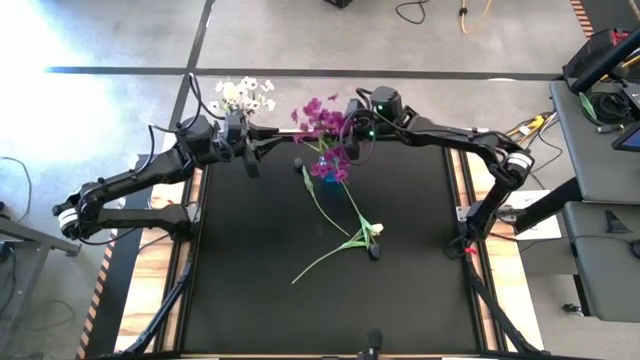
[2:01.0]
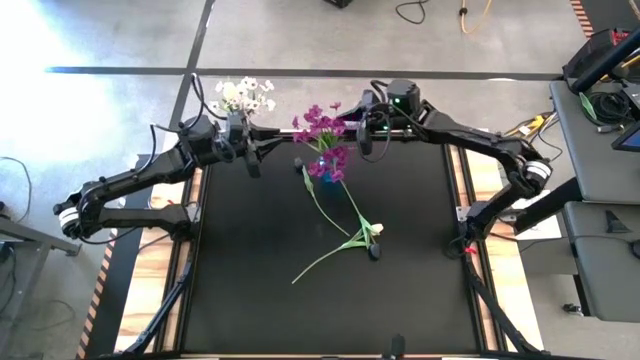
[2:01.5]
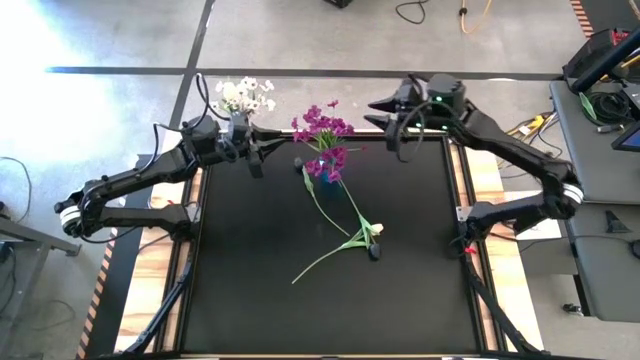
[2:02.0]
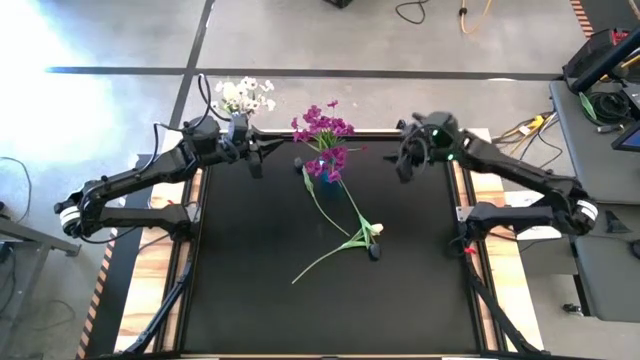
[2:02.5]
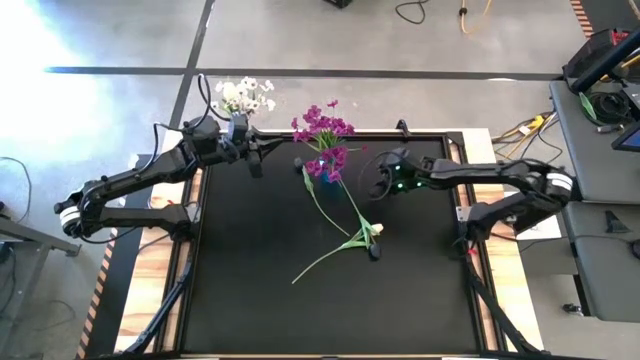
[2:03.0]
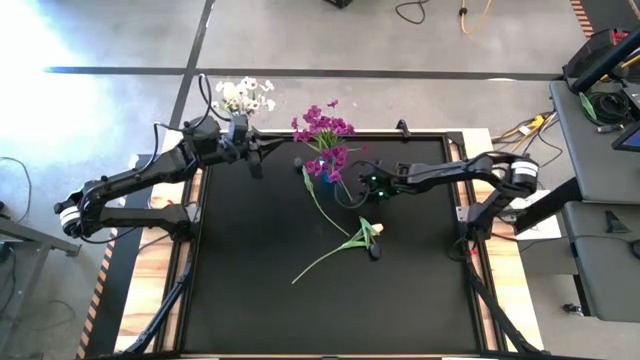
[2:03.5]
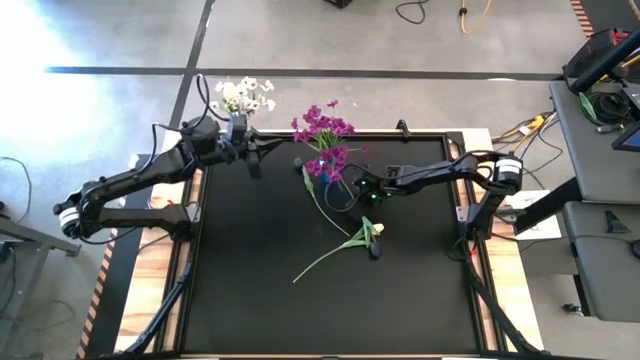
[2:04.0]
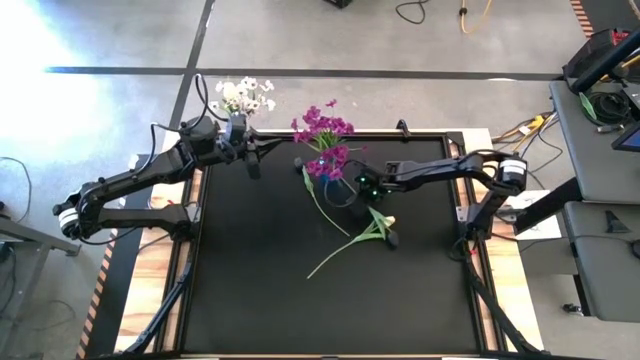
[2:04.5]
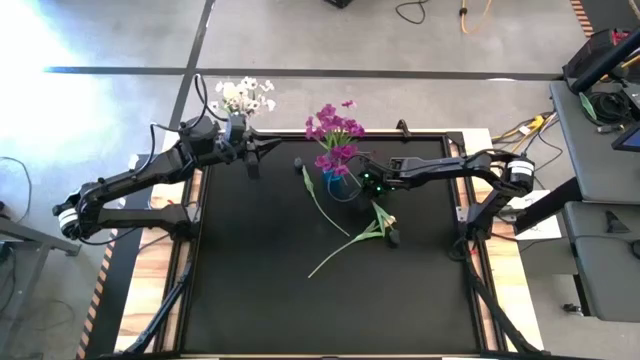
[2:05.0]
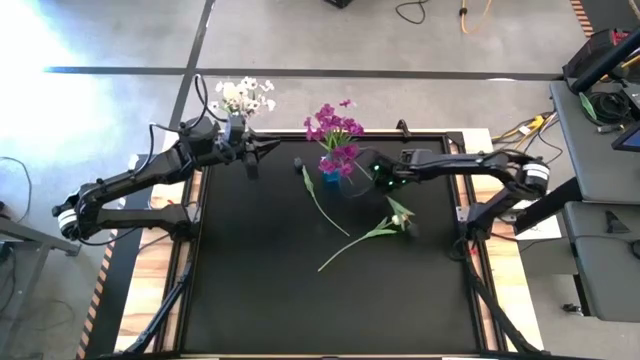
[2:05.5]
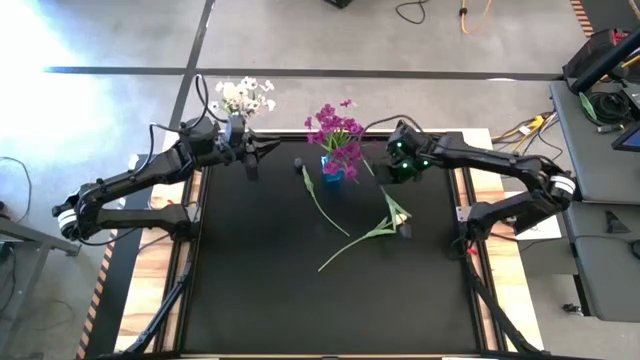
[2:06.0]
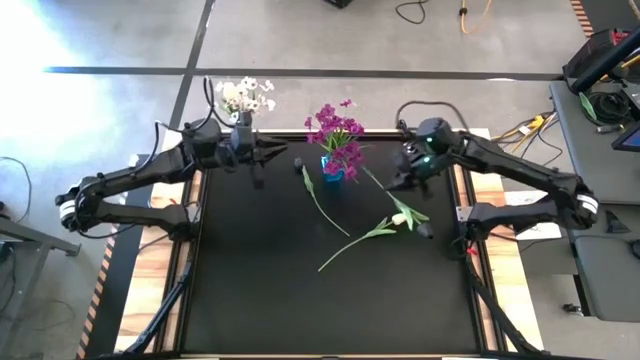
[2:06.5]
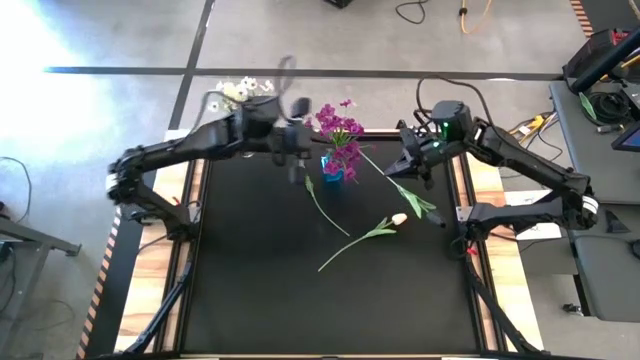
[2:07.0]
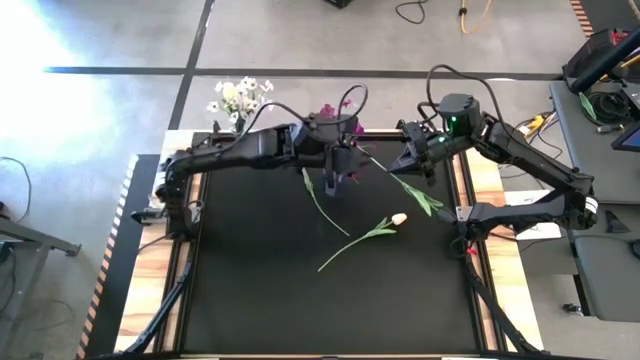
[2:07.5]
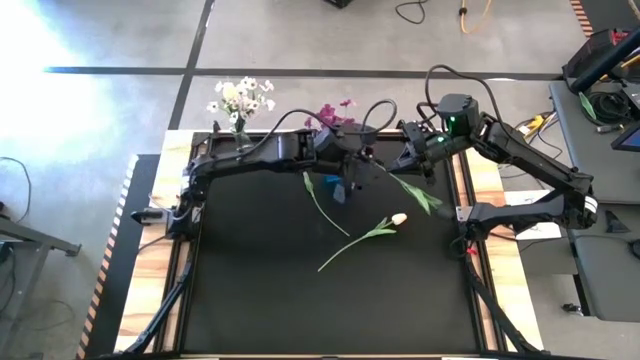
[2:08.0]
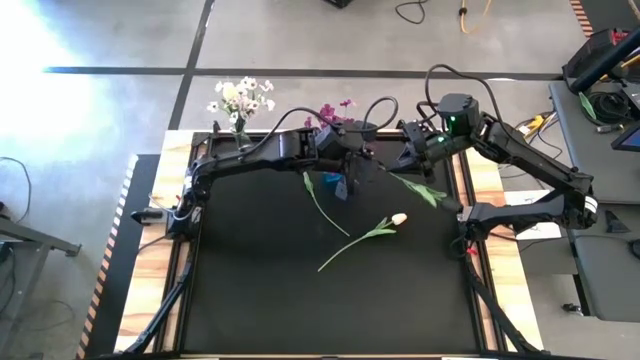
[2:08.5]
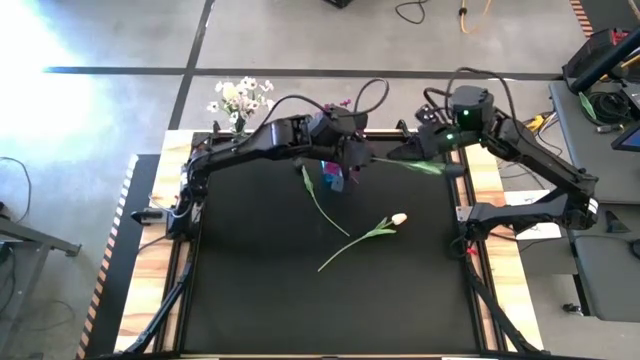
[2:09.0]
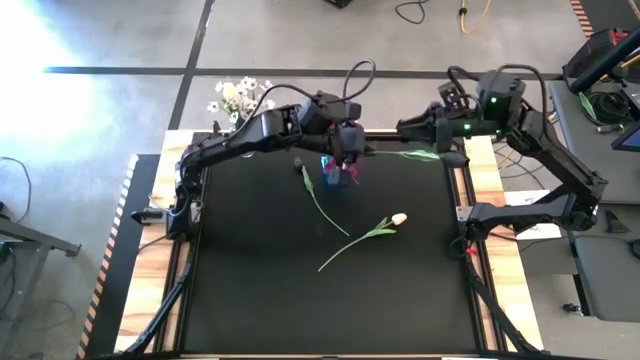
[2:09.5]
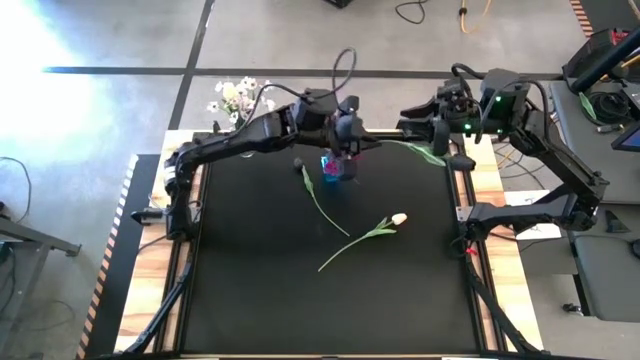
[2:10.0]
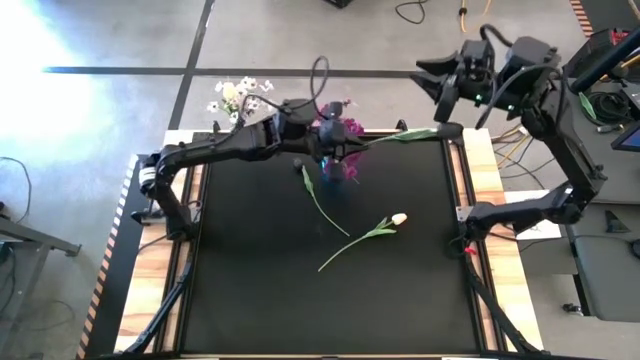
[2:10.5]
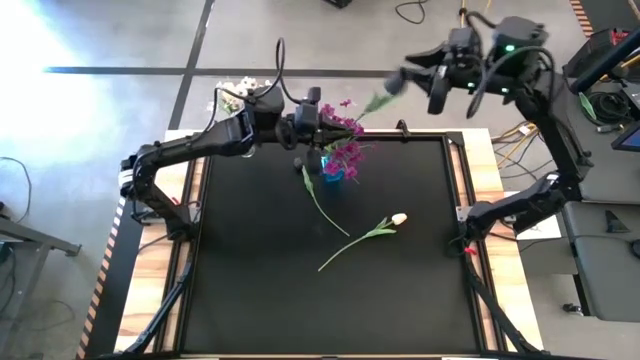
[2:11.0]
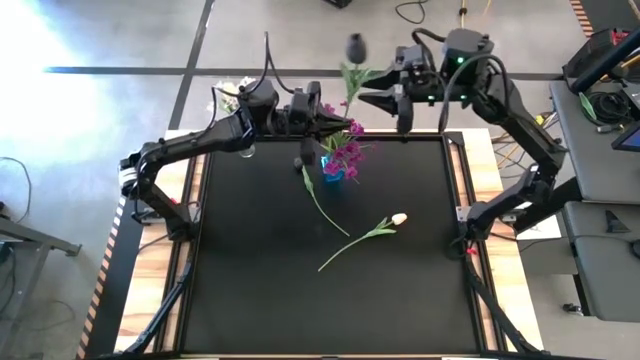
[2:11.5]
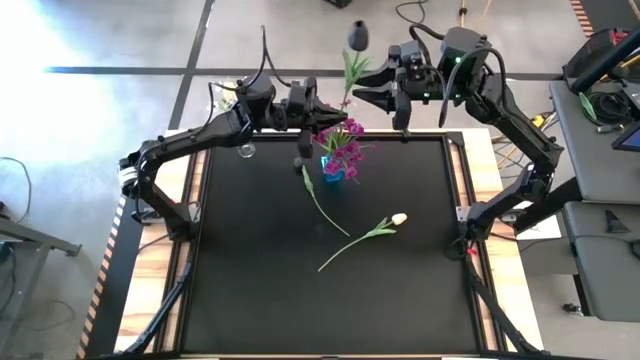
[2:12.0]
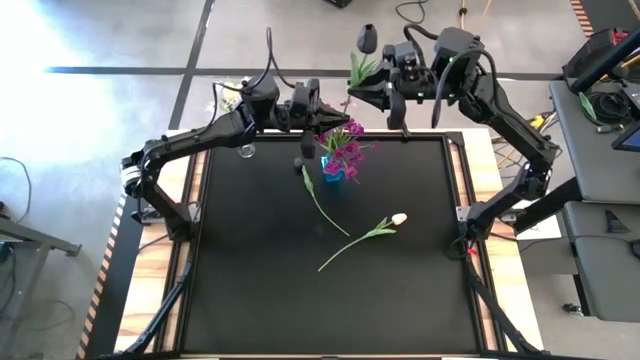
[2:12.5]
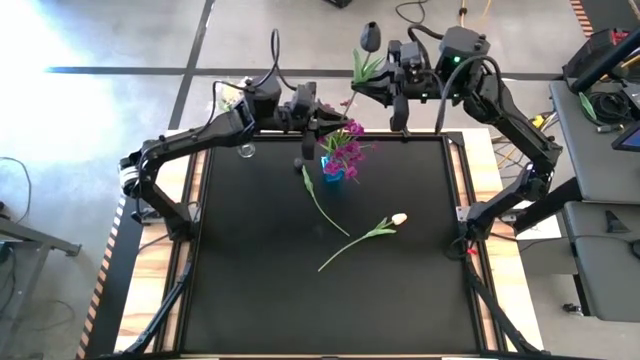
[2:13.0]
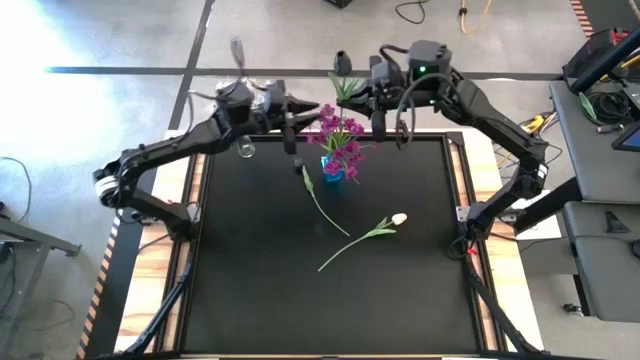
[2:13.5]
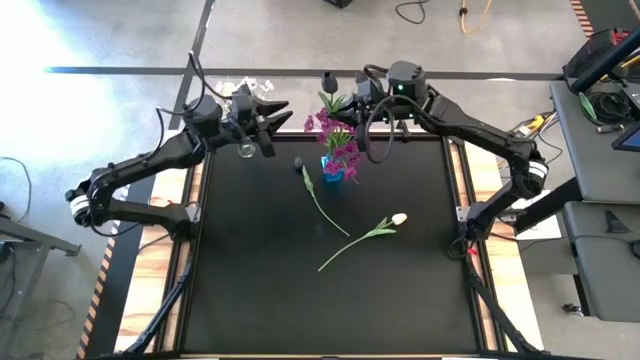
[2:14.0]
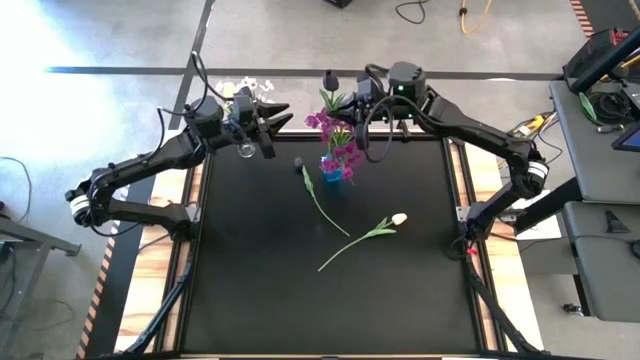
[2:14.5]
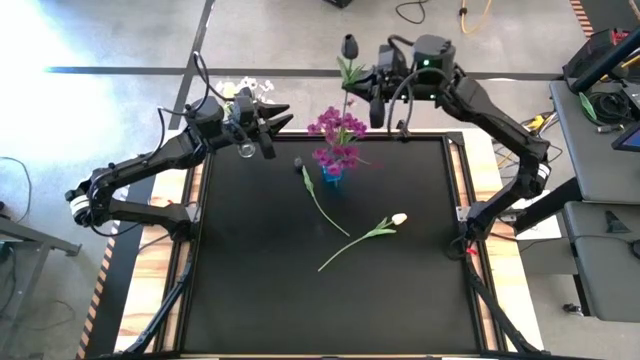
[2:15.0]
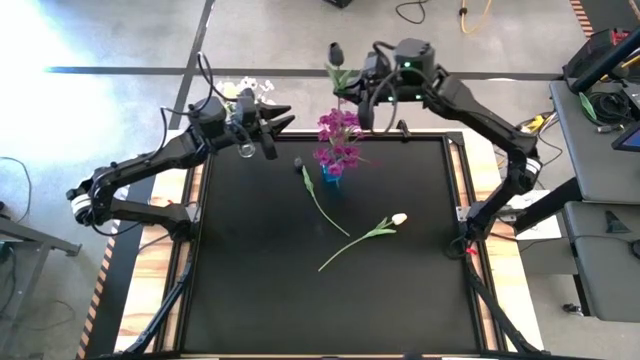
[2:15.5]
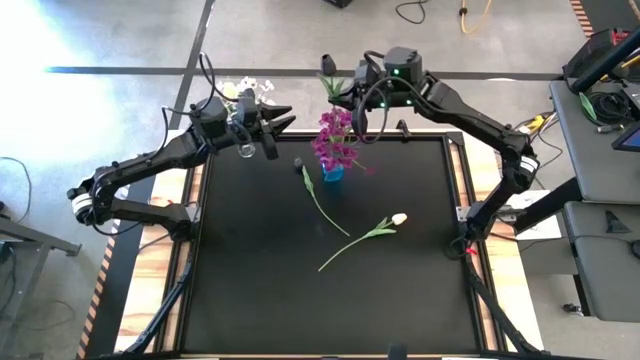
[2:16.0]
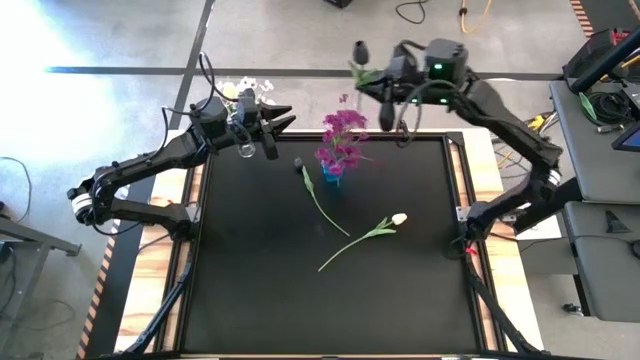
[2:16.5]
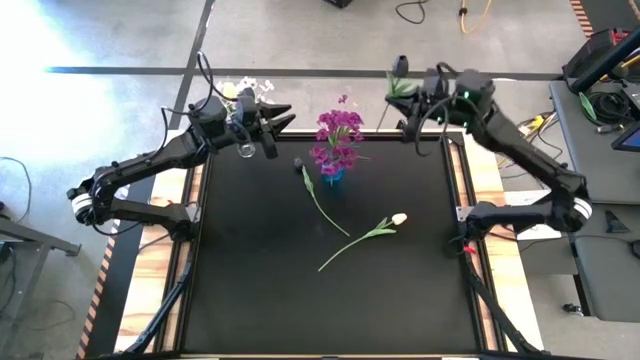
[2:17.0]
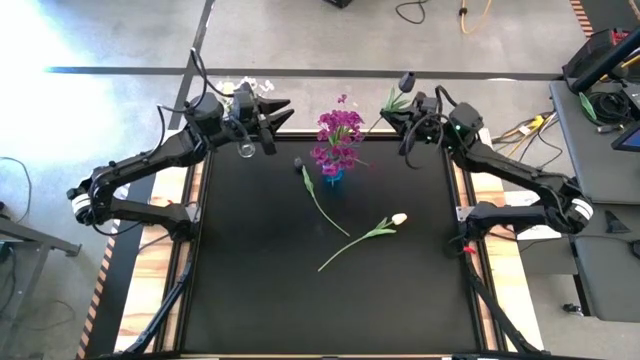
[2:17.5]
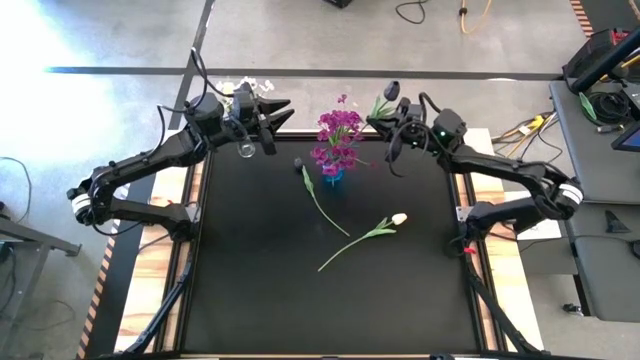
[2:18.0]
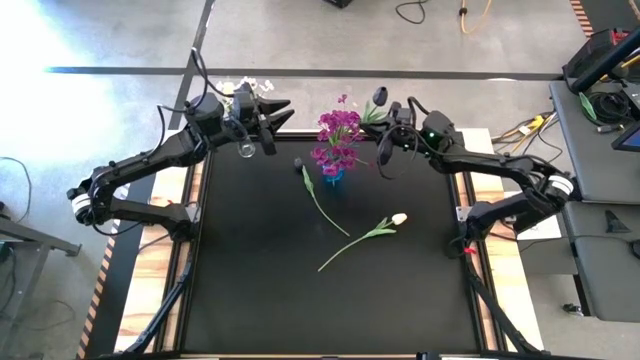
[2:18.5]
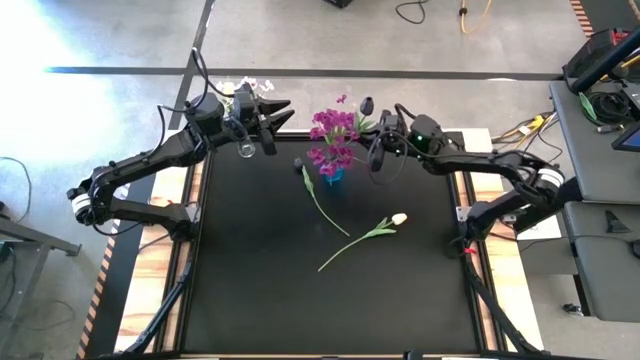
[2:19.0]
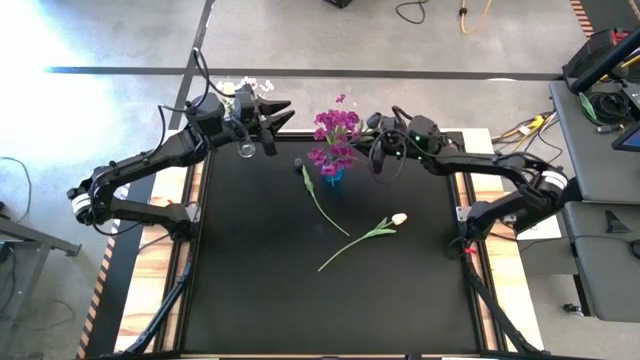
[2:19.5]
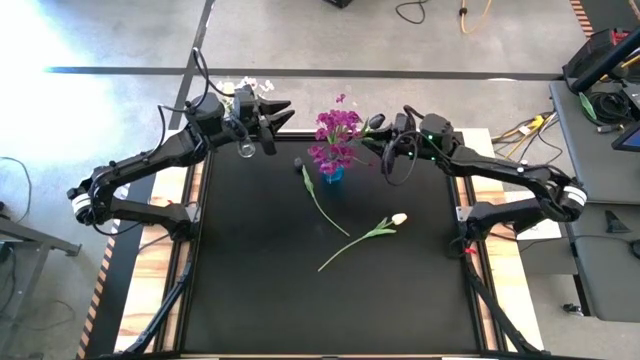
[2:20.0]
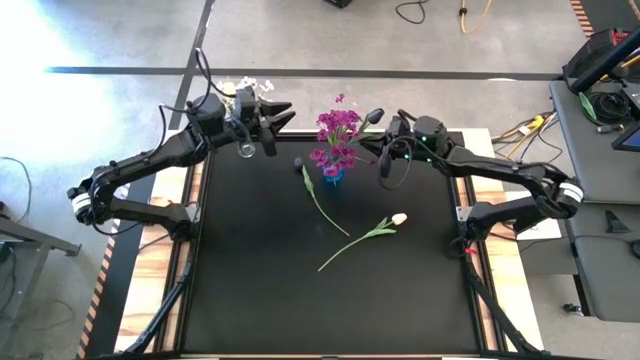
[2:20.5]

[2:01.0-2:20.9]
Task: Sort flowers into vase by color
Put the right black flower into the blue vase
